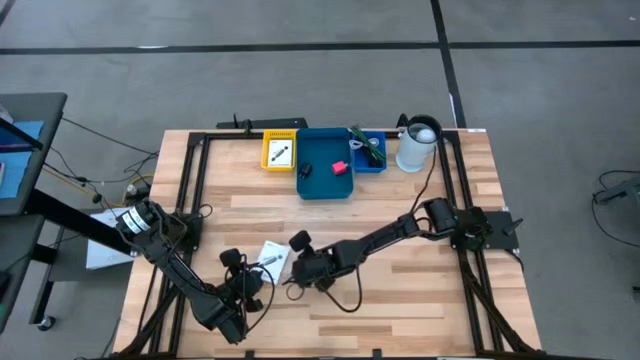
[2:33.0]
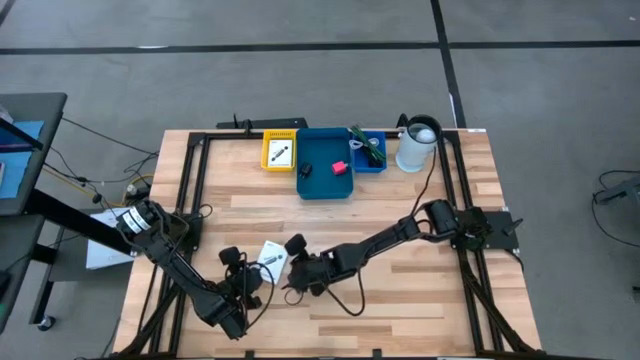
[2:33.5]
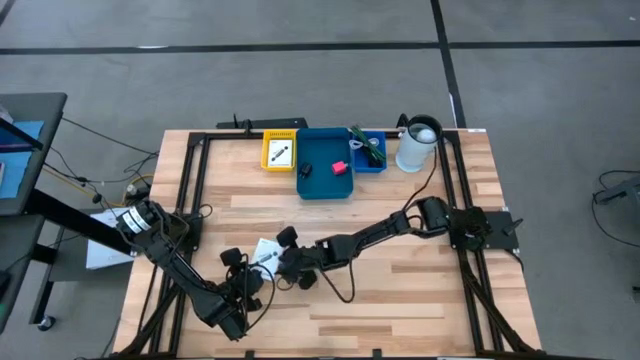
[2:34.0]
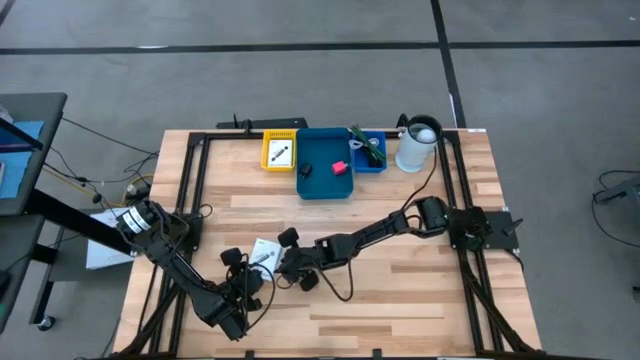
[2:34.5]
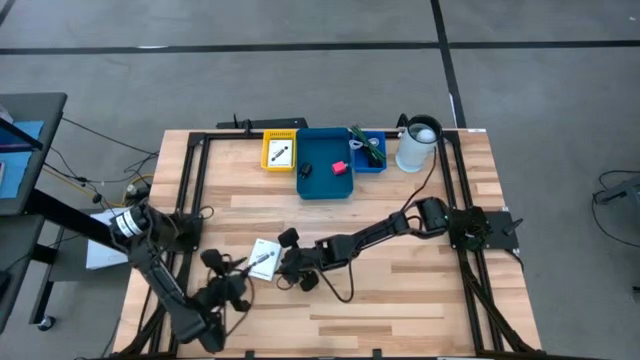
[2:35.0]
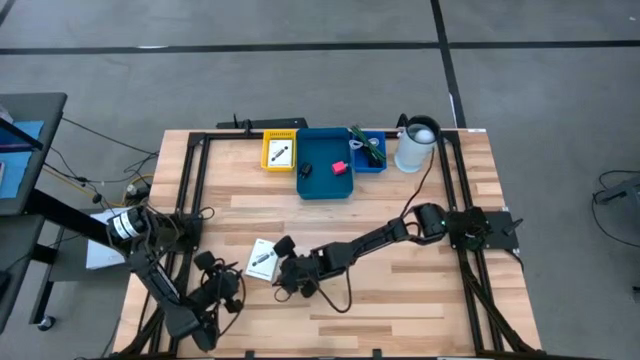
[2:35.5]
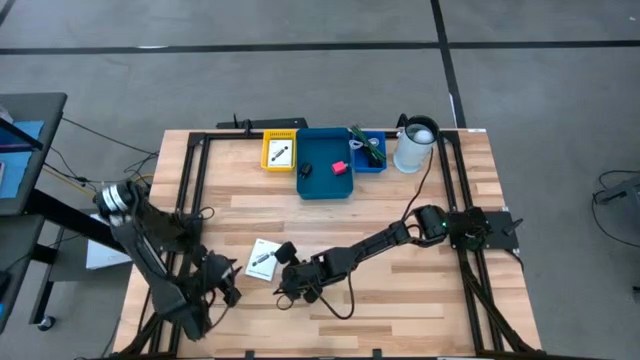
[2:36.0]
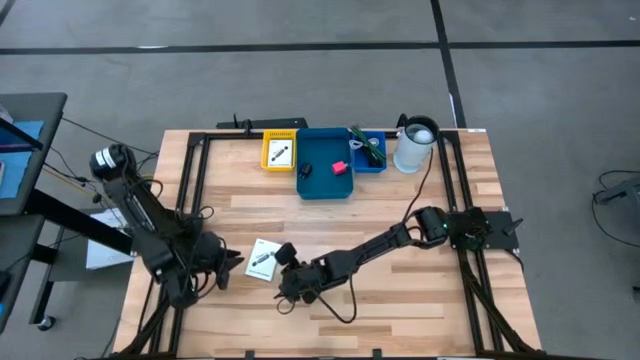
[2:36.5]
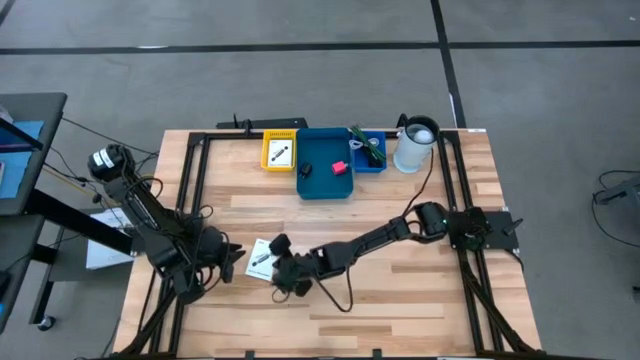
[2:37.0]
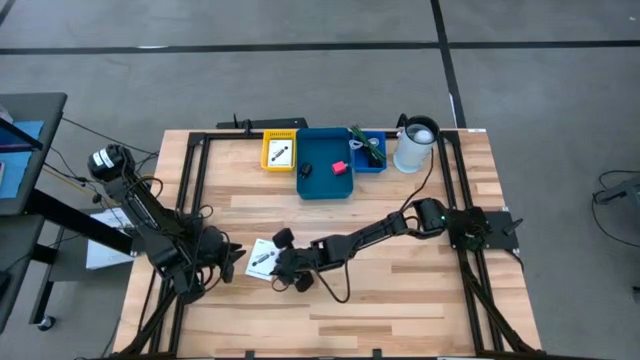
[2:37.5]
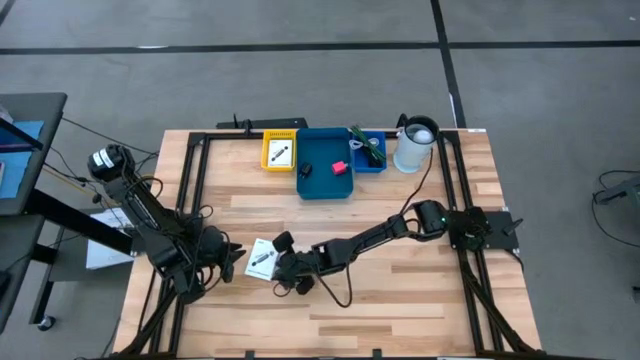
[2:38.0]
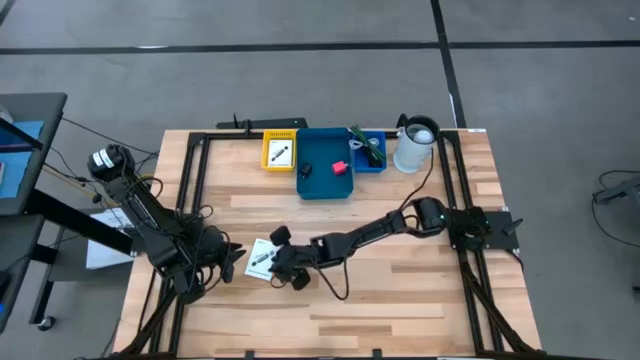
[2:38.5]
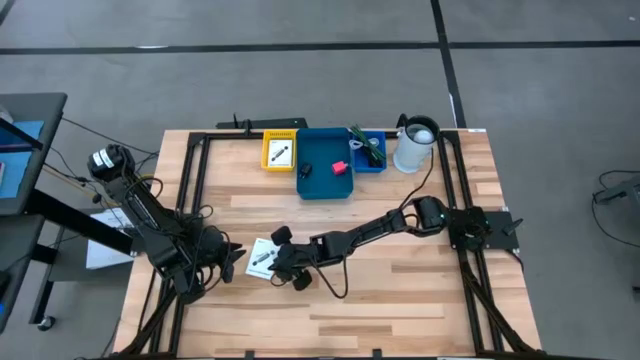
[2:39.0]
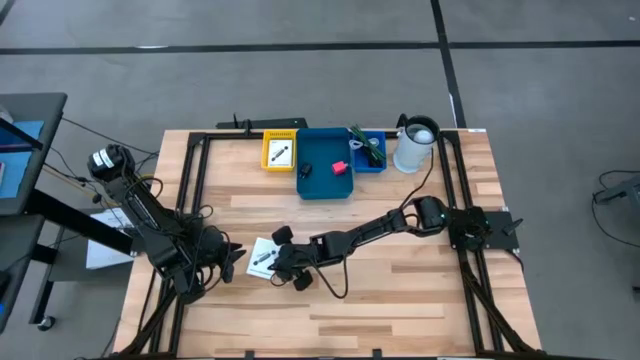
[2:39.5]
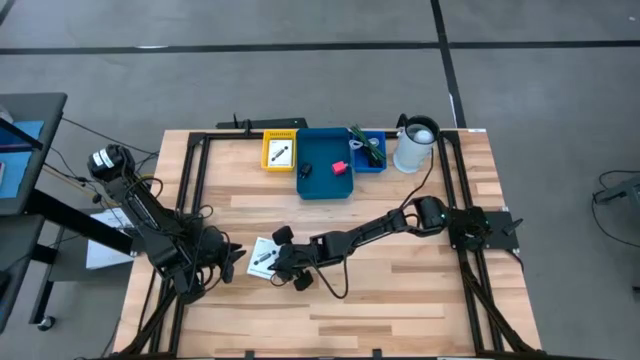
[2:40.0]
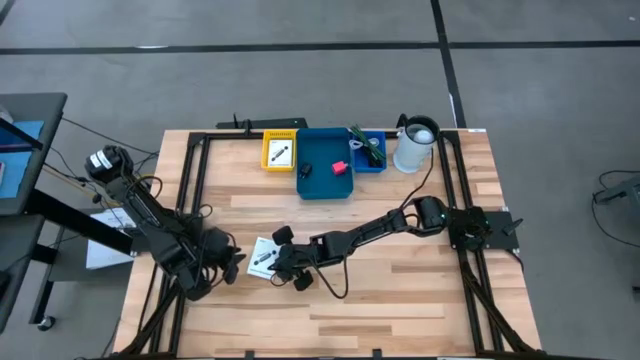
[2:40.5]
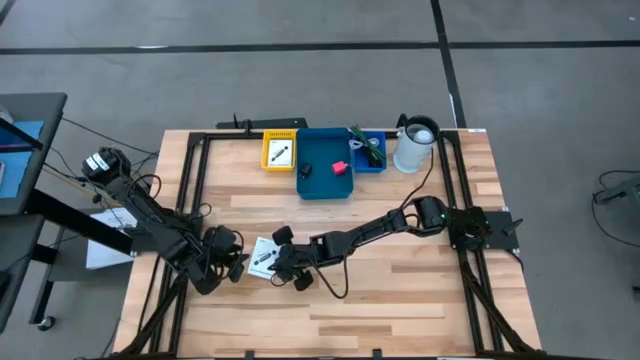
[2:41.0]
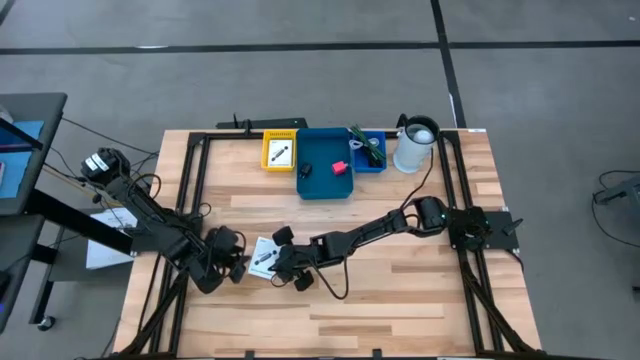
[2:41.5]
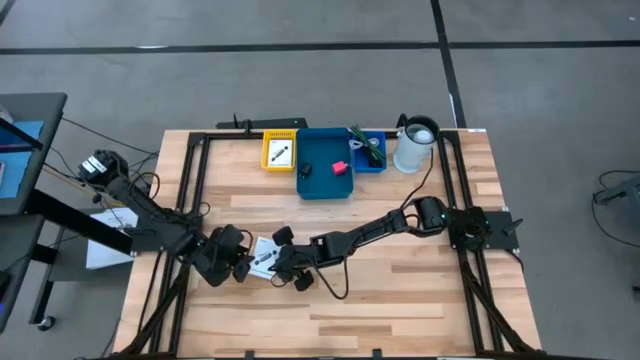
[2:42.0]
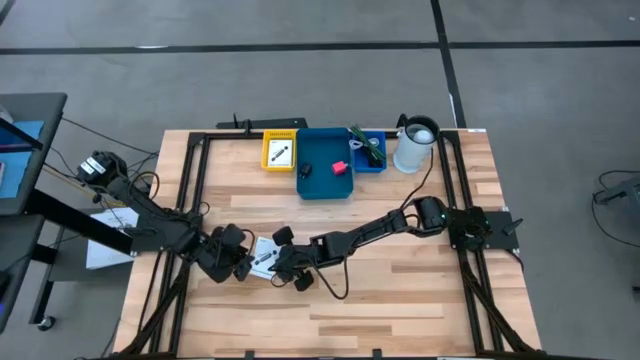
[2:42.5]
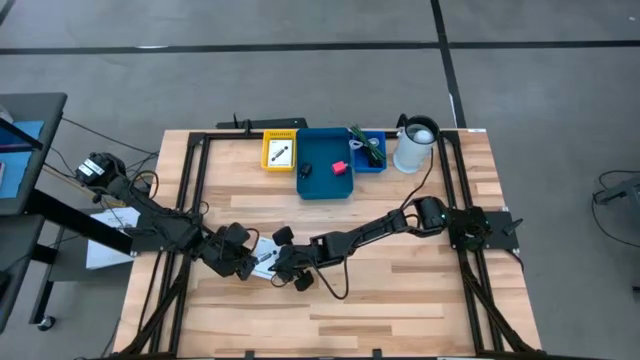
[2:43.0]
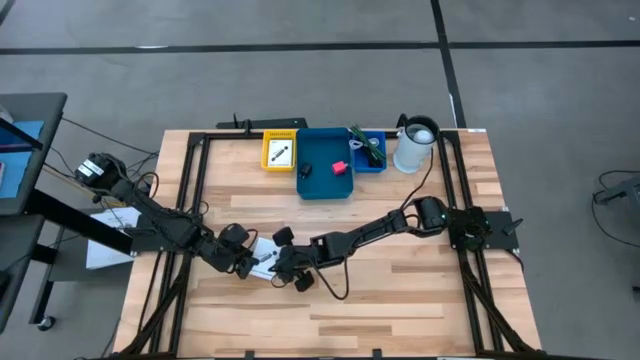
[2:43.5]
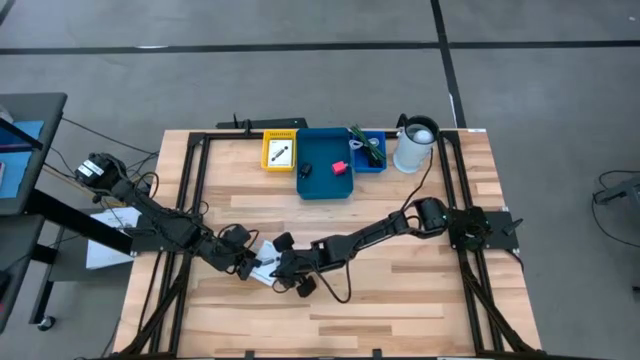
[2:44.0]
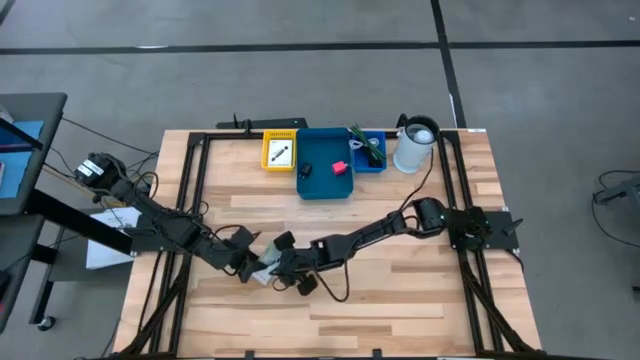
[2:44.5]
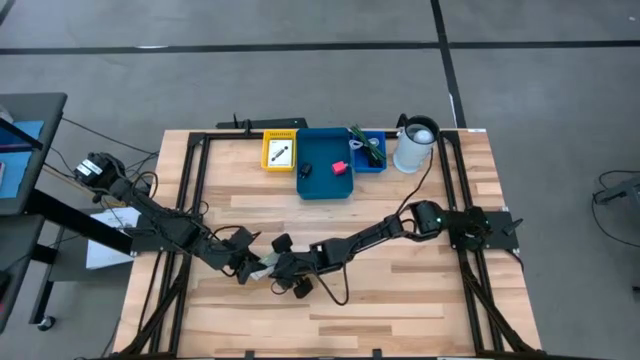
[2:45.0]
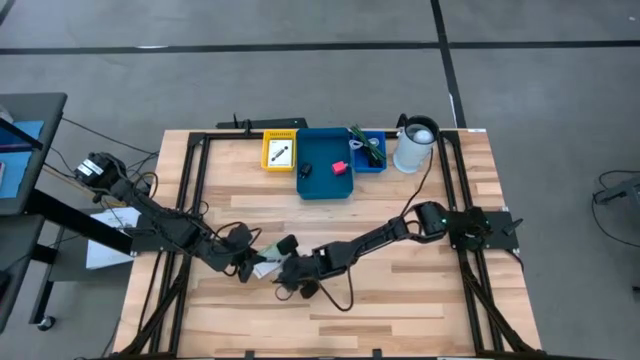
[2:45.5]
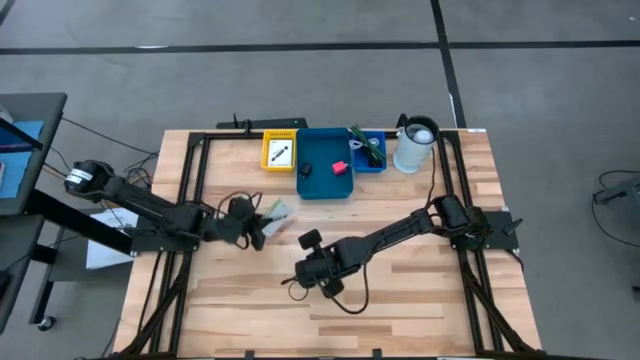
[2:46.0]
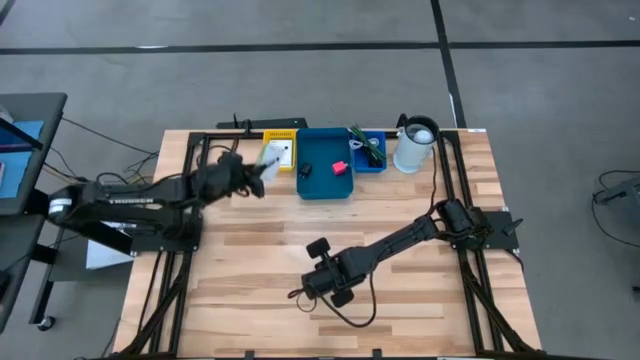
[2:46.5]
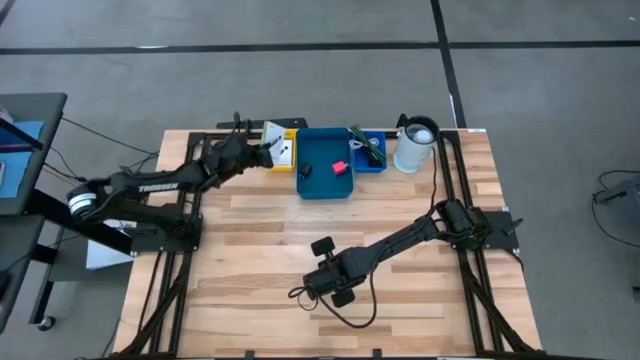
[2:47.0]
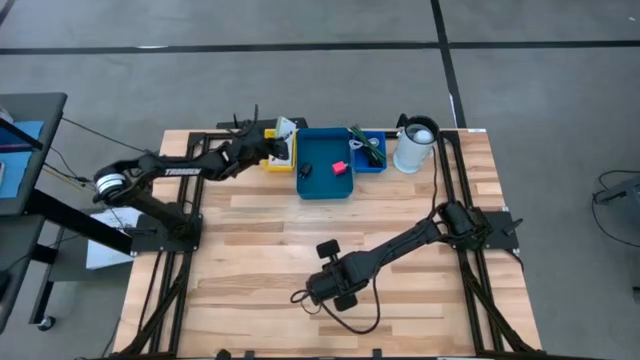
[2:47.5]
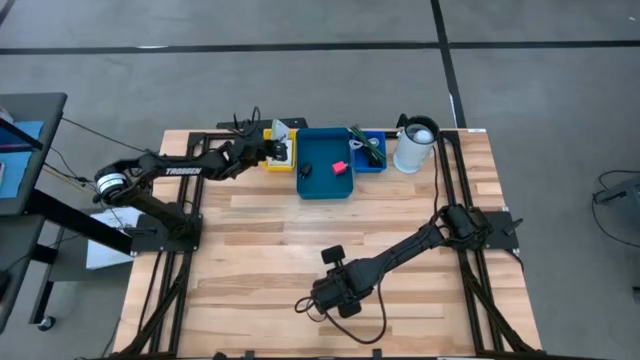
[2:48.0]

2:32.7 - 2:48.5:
Task: Pick and place items into bin
Put the card reader box into the yellow basket

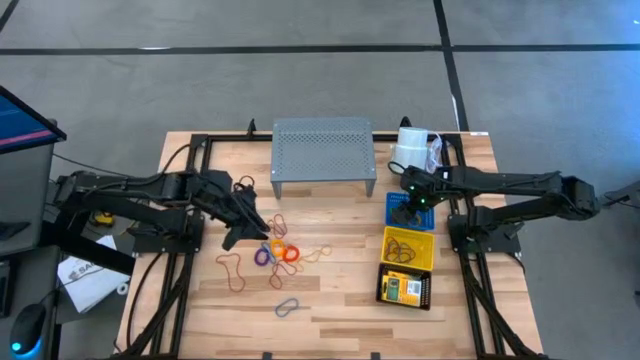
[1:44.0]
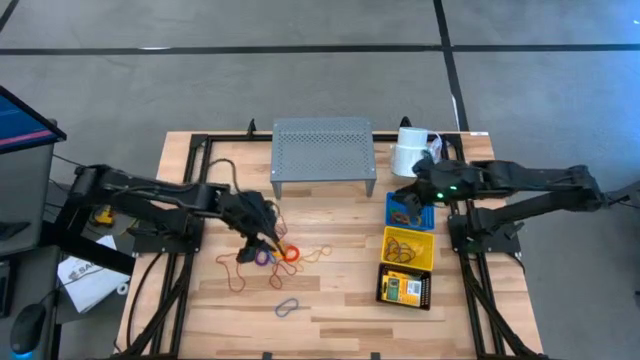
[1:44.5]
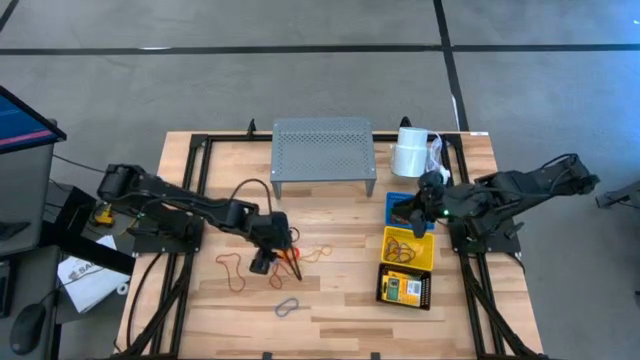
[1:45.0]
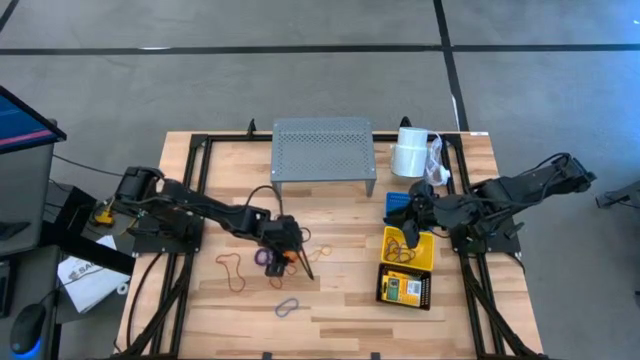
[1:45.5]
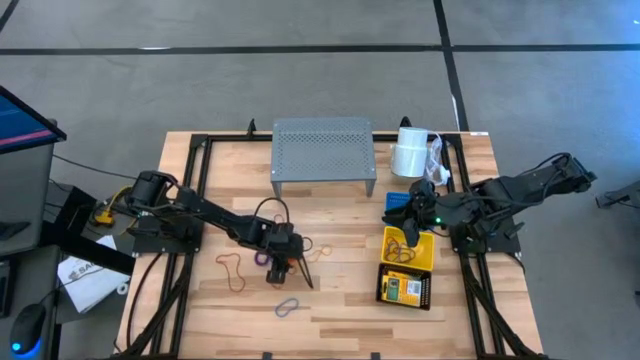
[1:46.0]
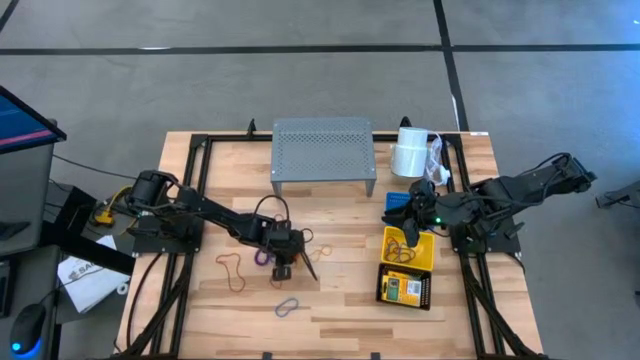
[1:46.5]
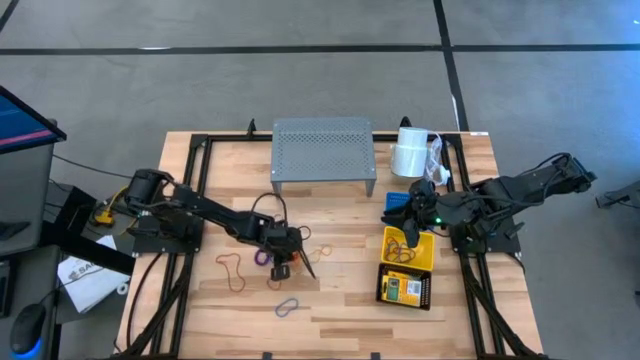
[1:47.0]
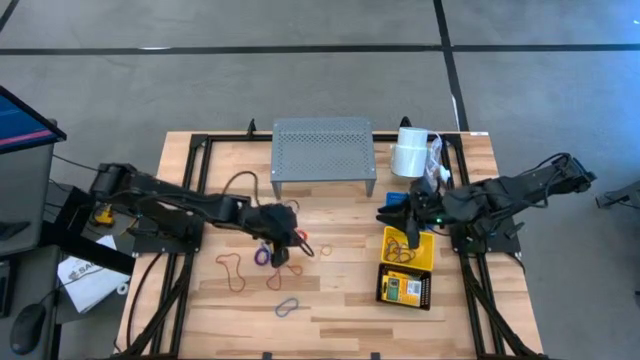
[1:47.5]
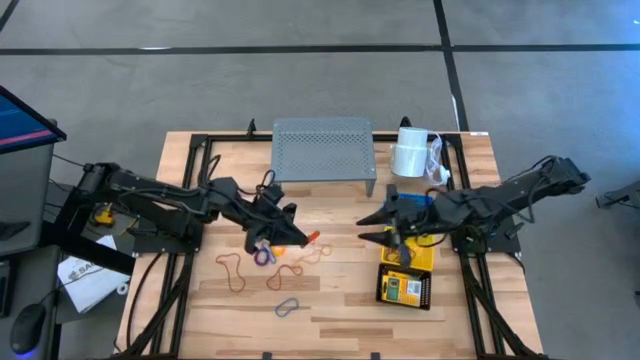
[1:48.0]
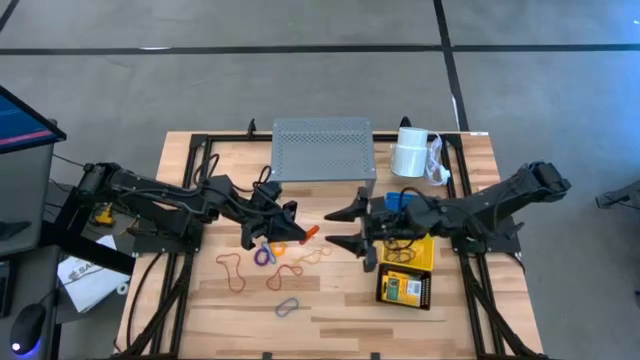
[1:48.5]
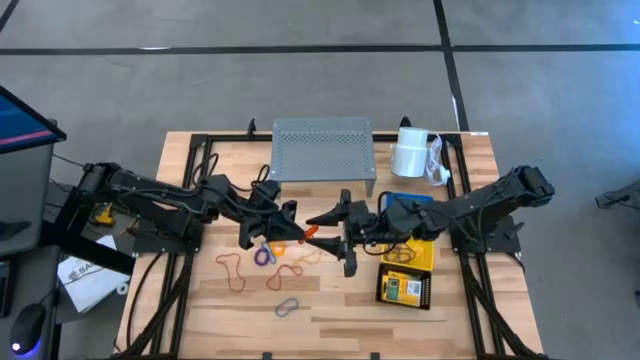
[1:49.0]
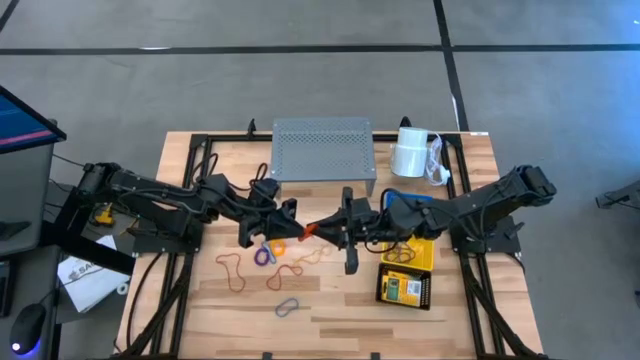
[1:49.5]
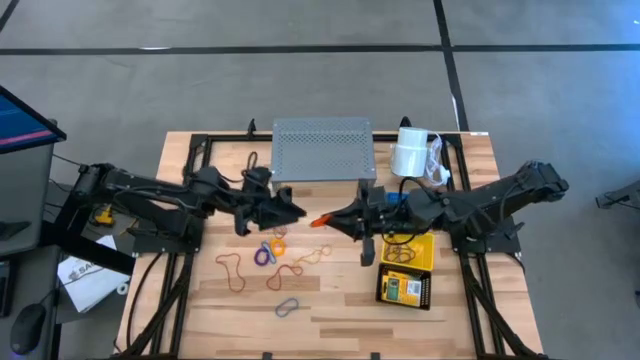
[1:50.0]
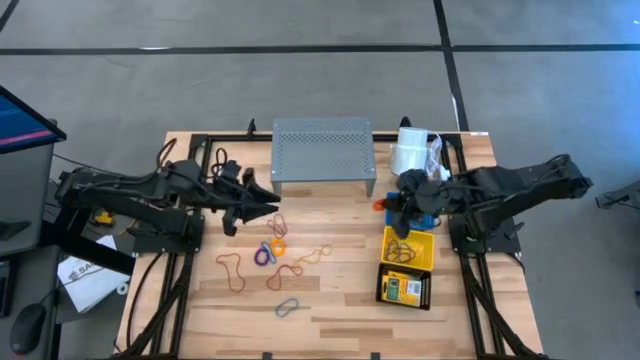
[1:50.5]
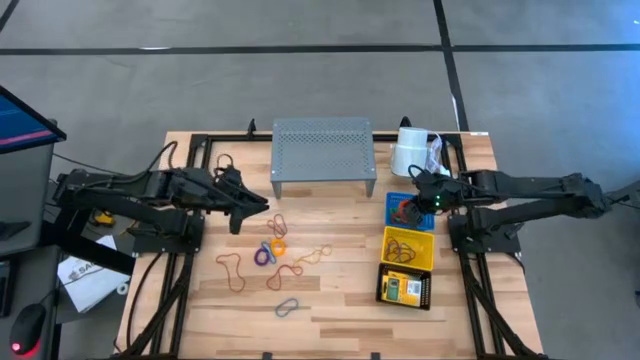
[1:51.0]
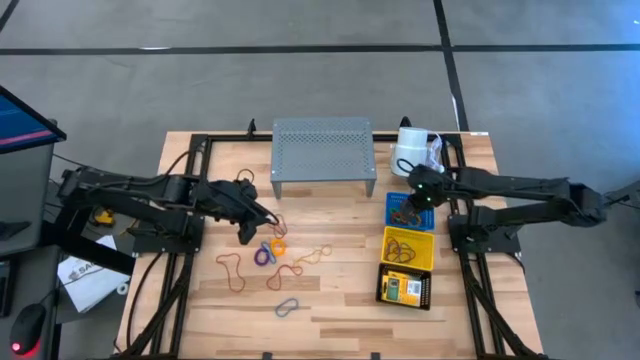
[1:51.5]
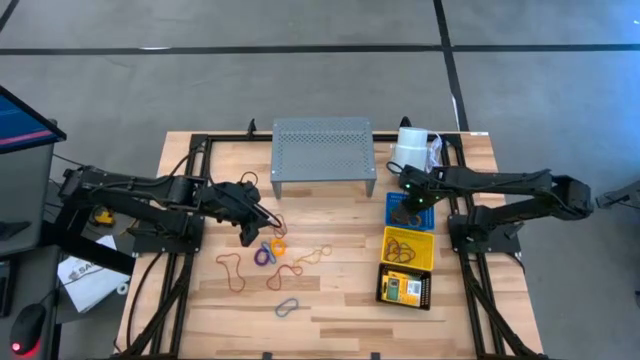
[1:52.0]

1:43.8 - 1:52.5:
Task: Pick & Place Office Desk Supplies
Put the orange spring keychain into the blue basket
